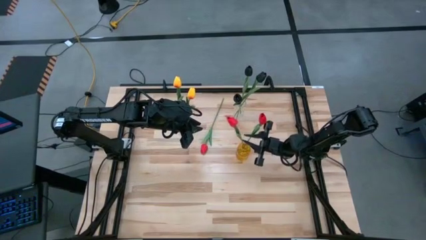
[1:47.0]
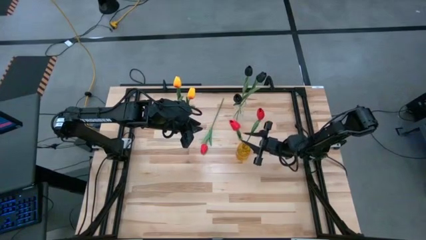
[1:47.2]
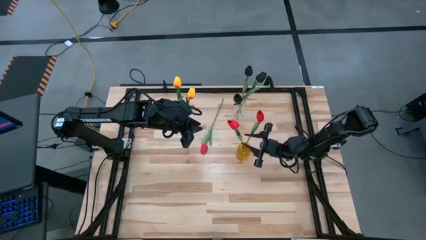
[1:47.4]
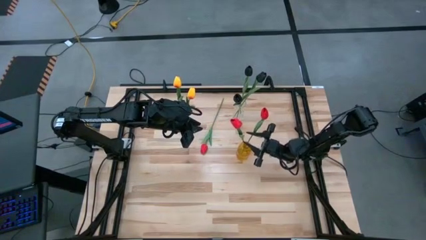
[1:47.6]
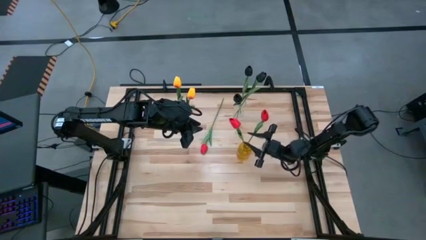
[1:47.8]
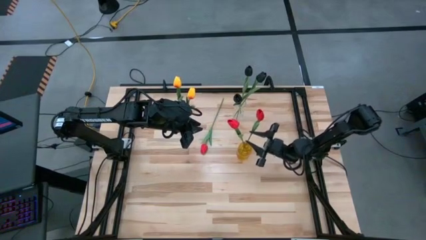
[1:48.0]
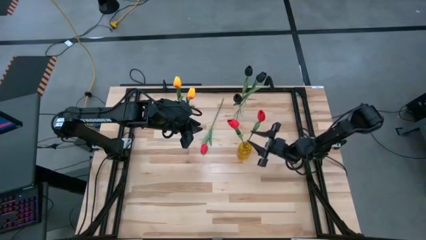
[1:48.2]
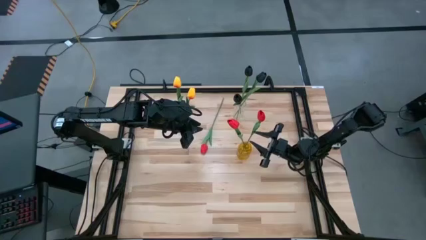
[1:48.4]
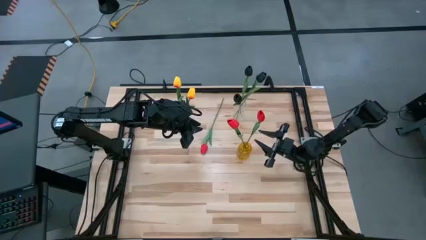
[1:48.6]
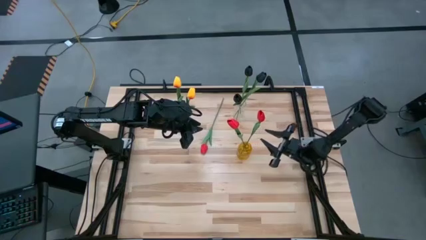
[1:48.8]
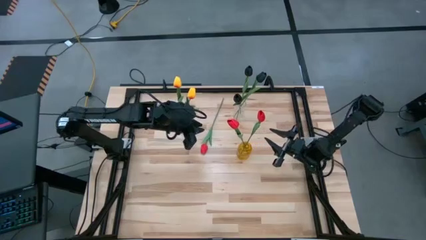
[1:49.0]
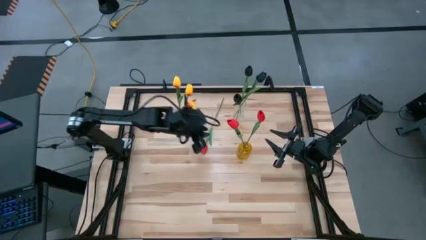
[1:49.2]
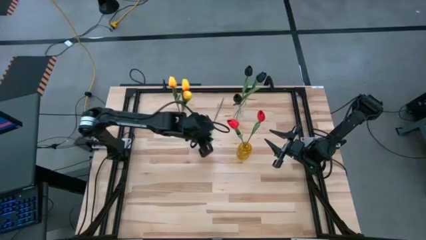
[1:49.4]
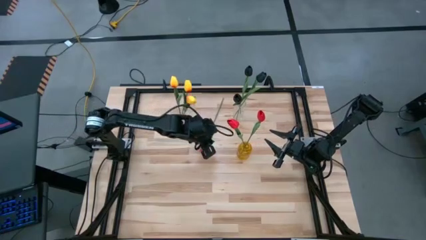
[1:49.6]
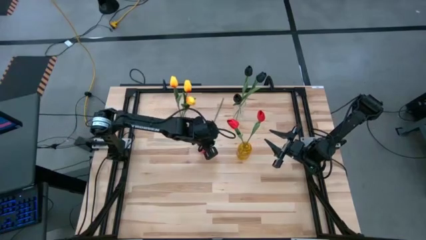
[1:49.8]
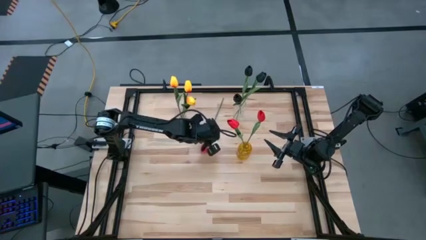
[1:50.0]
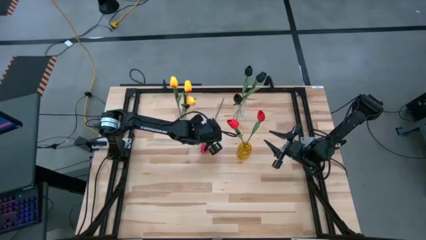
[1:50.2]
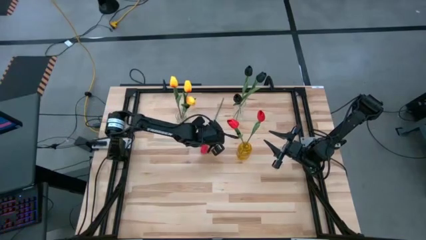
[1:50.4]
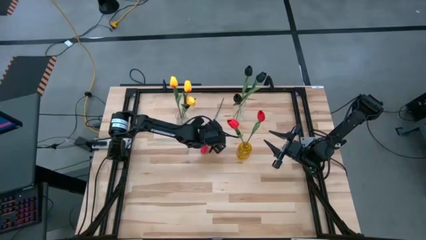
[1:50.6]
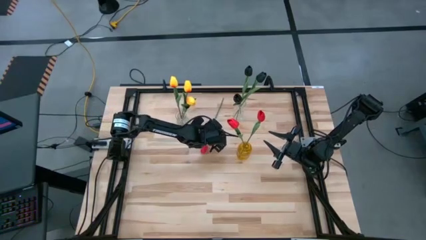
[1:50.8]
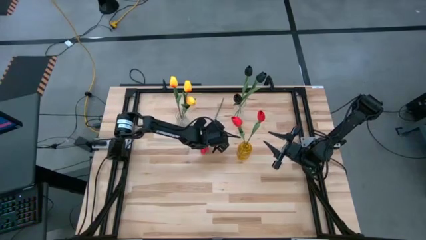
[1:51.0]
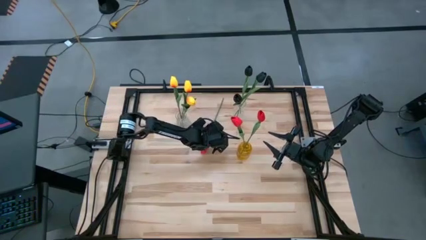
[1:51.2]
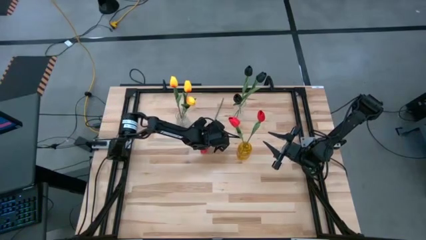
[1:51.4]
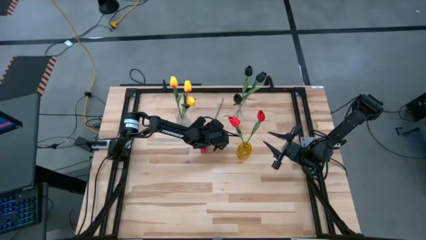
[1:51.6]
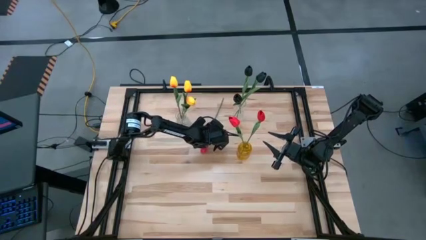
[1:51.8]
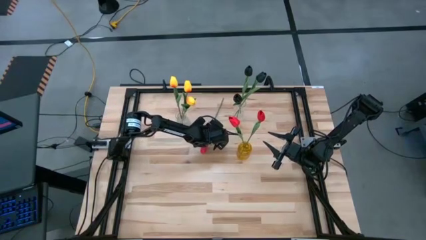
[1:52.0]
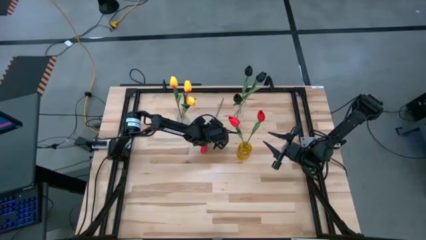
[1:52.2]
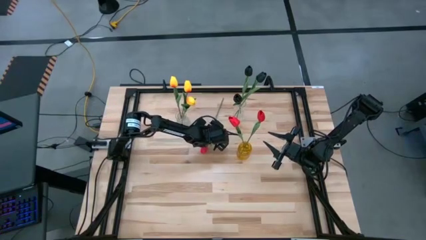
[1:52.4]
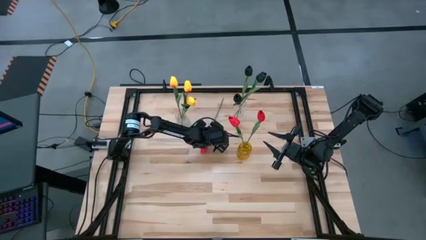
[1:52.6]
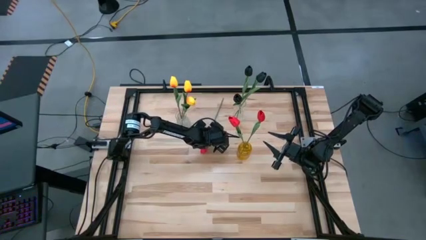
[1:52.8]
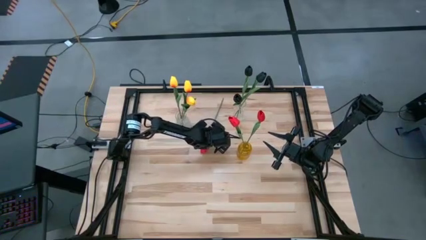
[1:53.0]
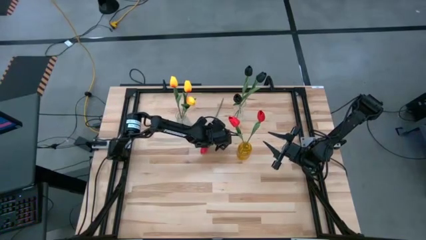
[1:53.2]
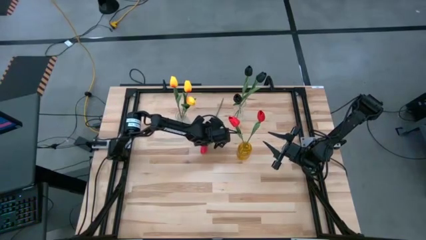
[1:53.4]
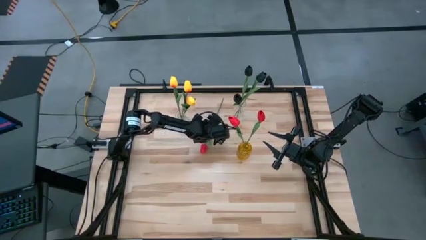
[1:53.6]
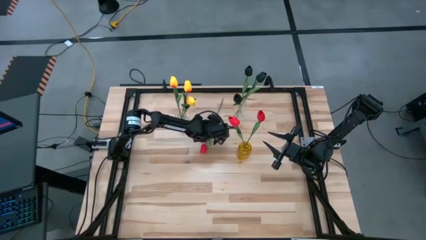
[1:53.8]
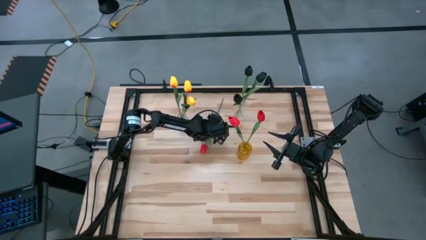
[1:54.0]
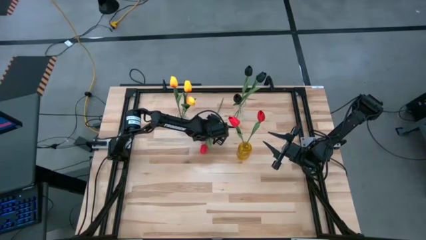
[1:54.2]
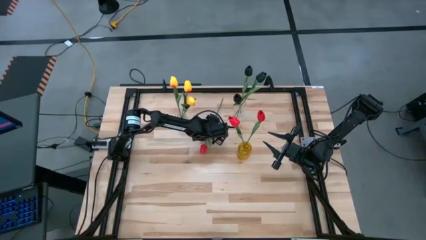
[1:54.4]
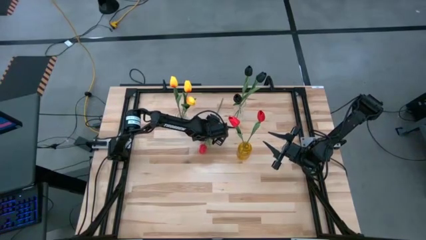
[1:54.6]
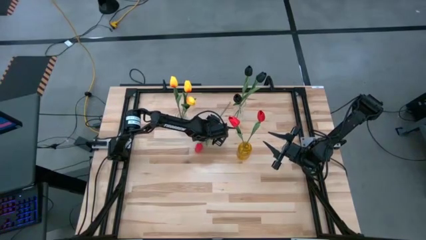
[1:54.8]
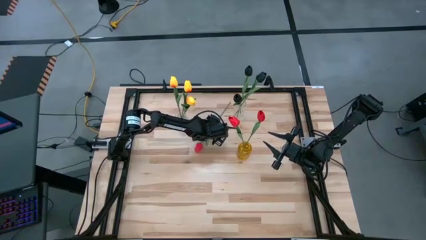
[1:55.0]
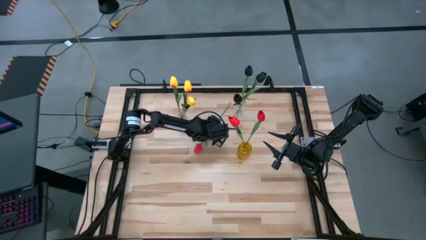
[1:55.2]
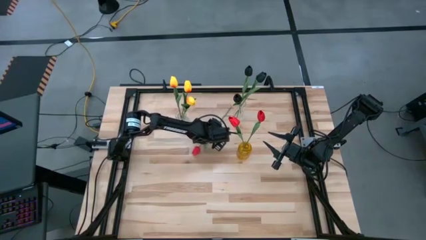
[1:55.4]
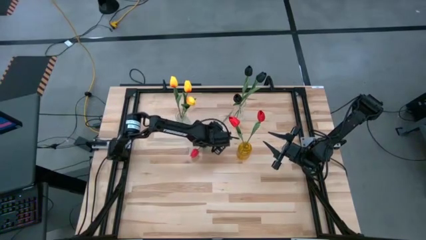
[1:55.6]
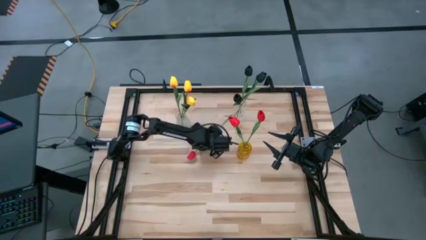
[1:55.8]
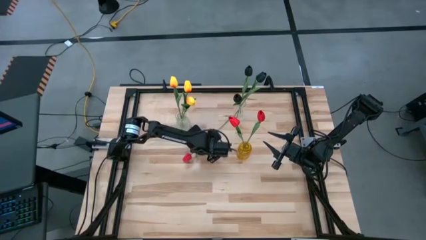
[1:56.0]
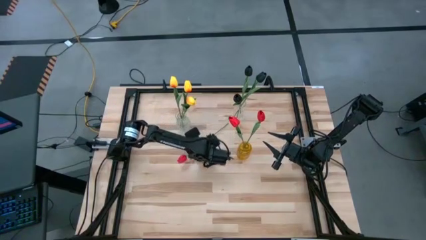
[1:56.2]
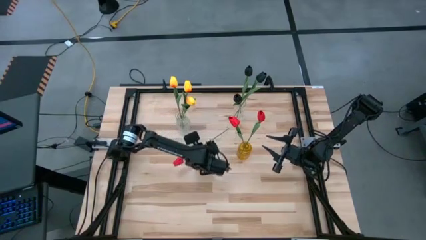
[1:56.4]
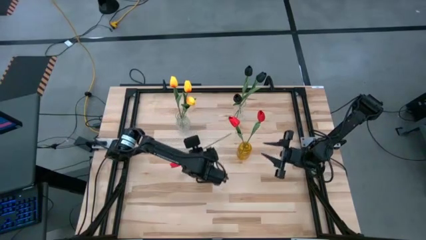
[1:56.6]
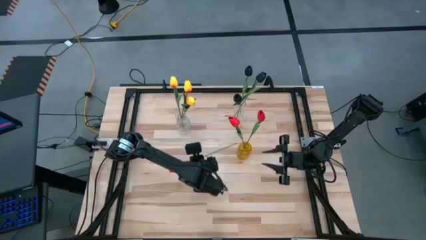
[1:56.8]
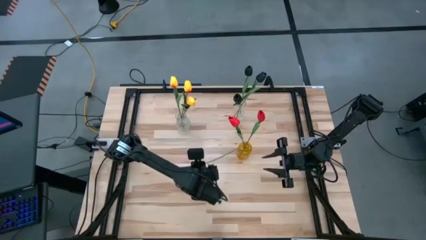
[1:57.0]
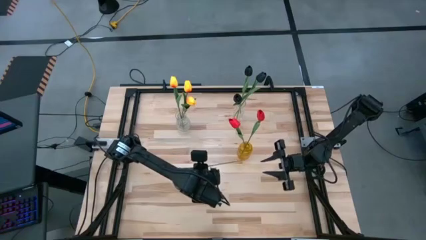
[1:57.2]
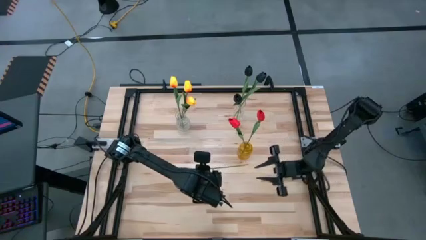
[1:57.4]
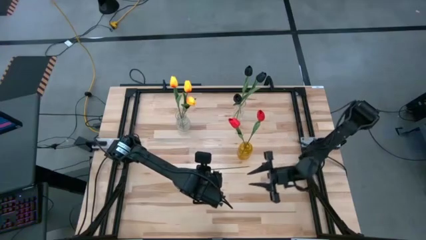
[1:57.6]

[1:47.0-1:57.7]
Task: Sort flowers into vase by color
Put the red tulip into the yellow vase

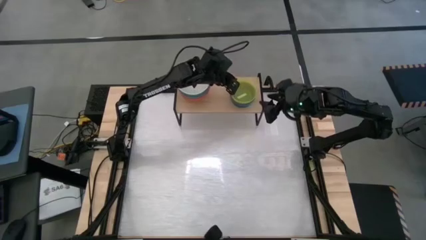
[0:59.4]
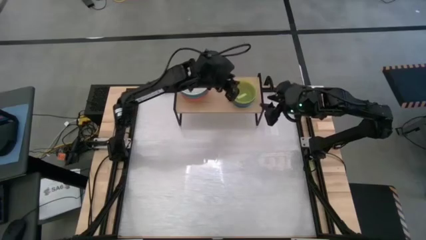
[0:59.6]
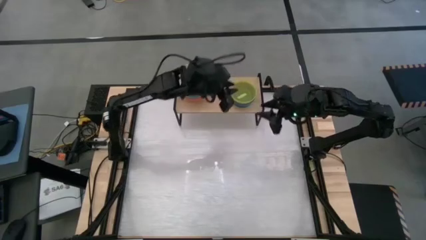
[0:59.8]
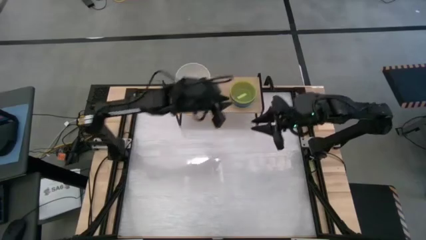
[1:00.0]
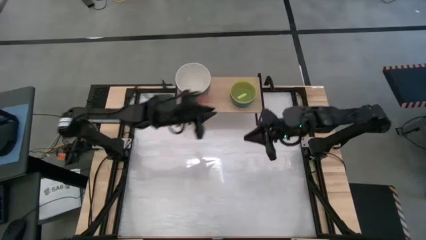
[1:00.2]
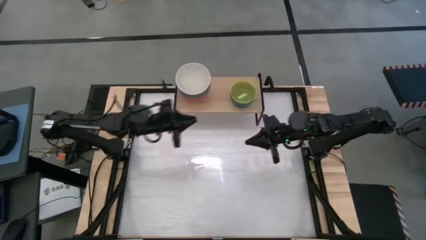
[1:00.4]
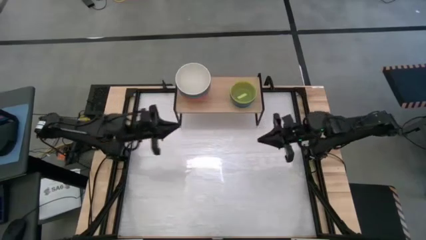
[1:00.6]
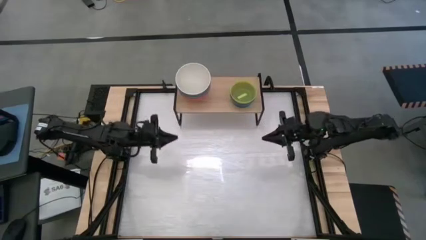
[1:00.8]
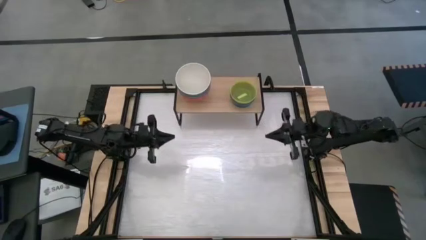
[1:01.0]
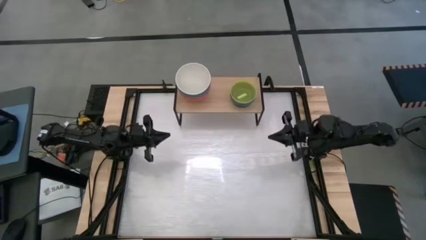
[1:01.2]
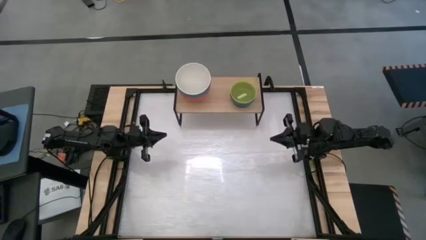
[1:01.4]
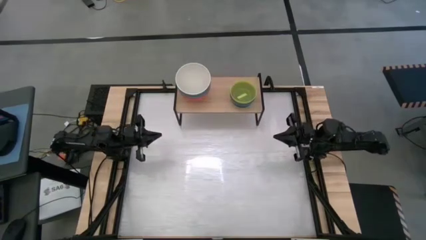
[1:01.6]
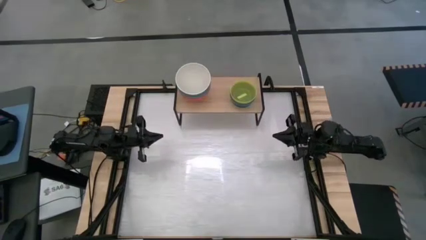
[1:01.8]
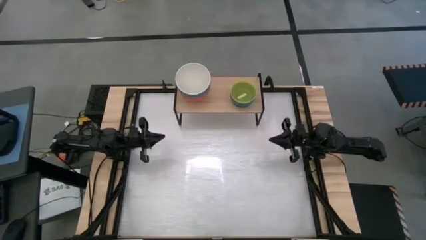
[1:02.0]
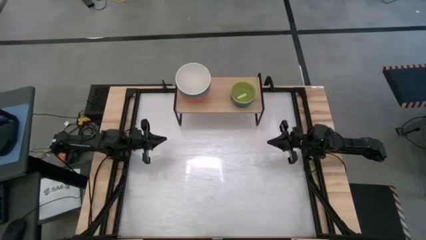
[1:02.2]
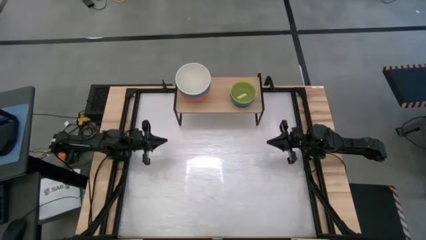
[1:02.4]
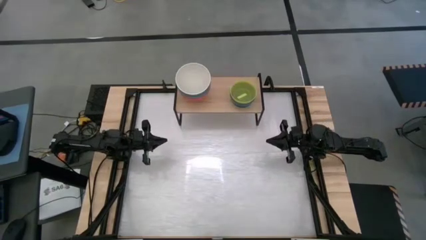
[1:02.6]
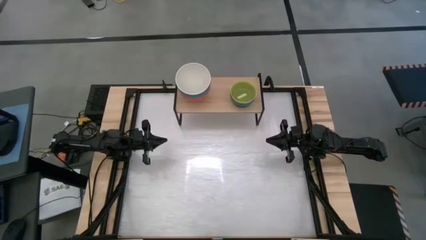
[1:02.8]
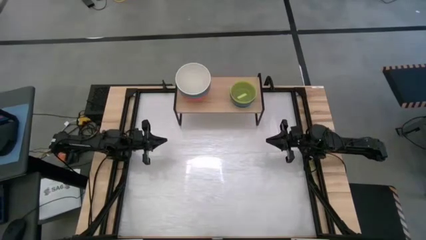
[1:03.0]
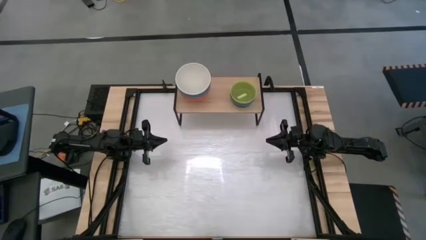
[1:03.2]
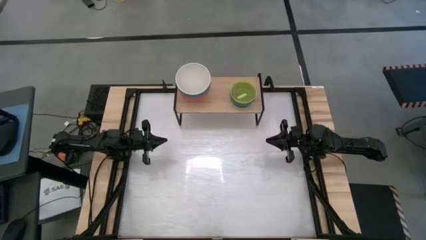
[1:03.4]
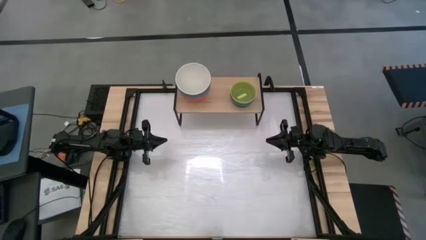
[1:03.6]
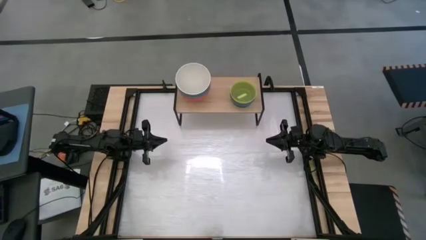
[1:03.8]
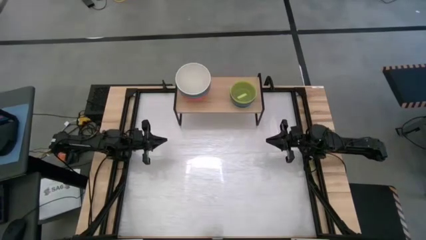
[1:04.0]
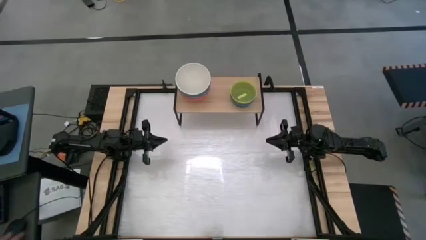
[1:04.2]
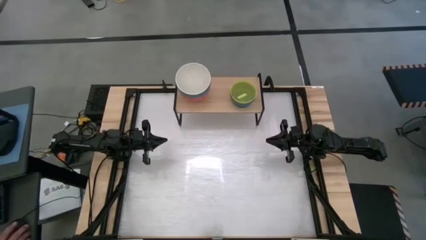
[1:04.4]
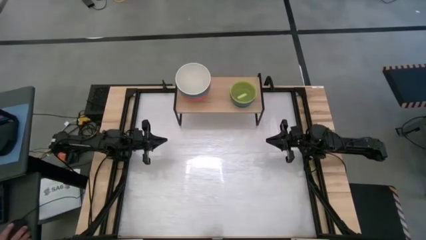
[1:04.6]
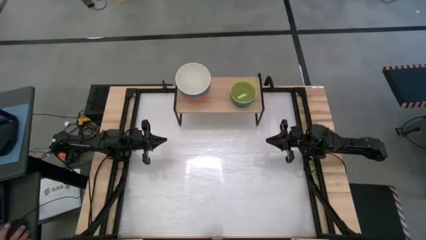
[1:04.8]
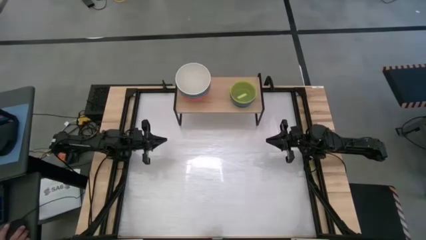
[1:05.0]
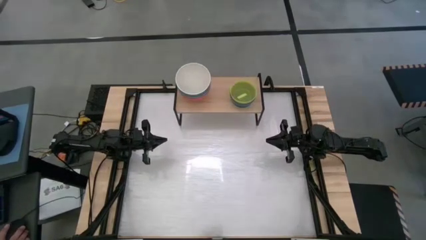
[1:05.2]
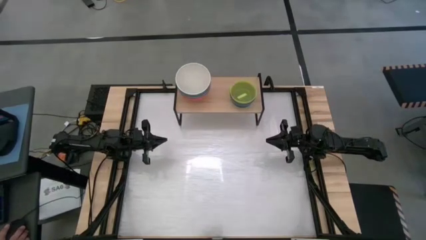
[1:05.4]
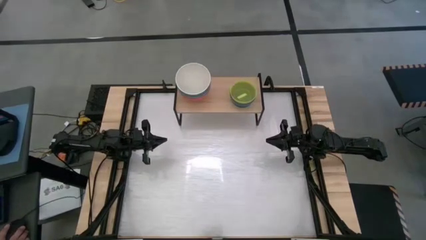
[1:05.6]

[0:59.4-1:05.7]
Task: Place and stack bowls onto a shelf
Return to Home Position
